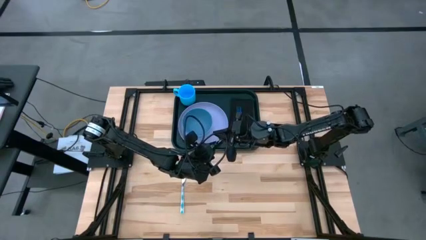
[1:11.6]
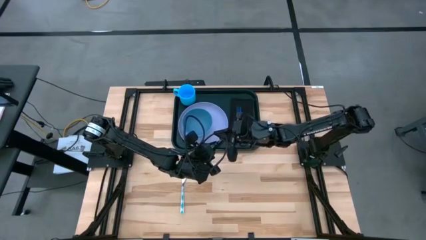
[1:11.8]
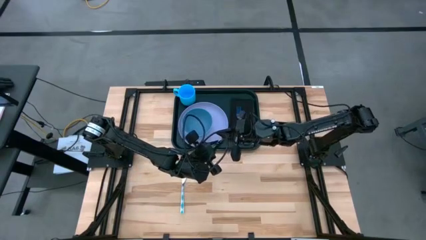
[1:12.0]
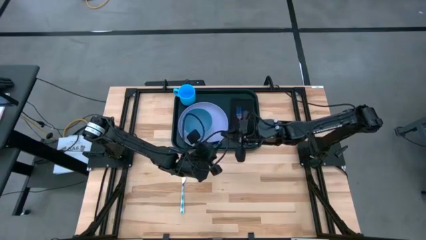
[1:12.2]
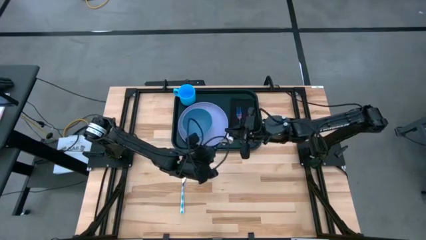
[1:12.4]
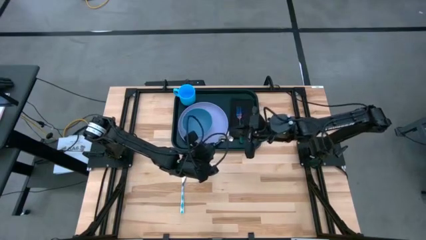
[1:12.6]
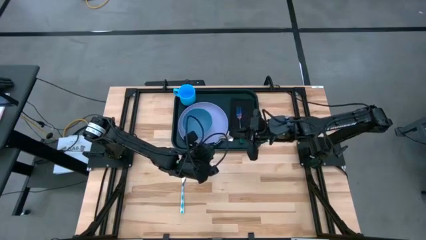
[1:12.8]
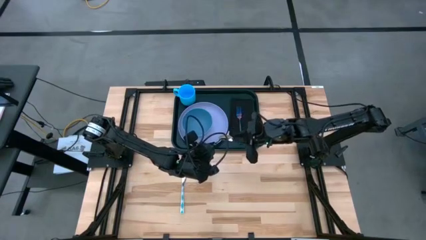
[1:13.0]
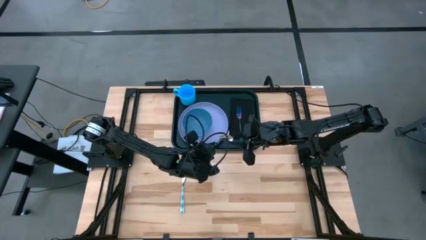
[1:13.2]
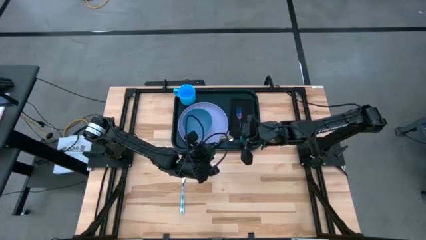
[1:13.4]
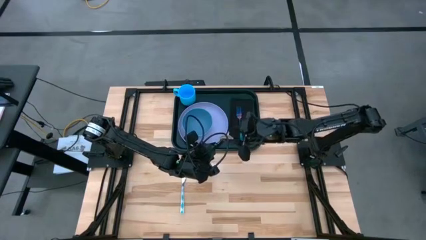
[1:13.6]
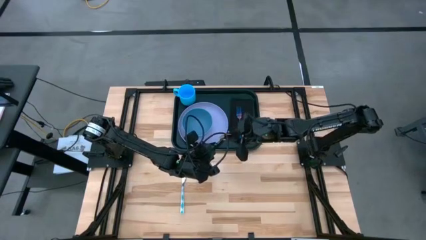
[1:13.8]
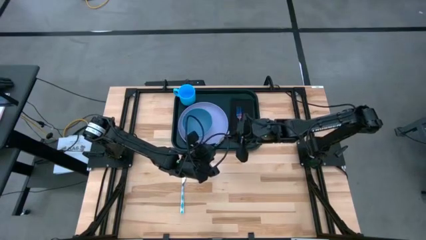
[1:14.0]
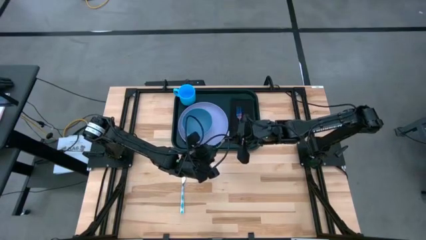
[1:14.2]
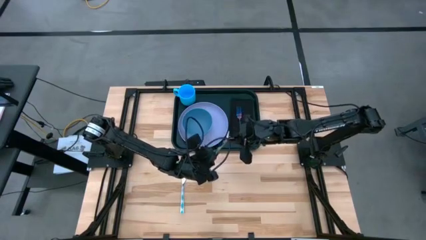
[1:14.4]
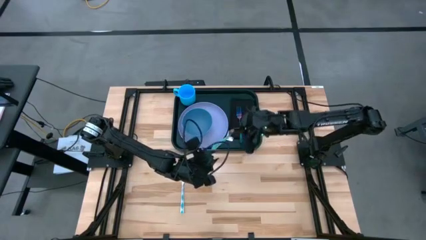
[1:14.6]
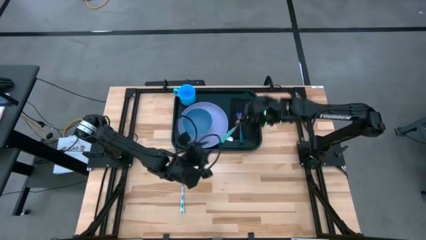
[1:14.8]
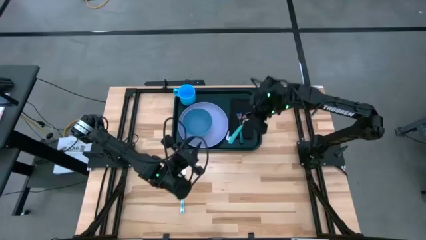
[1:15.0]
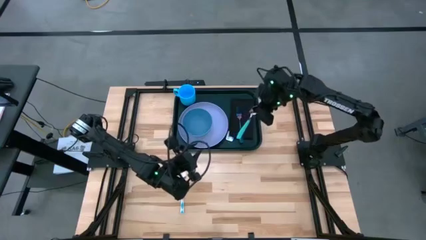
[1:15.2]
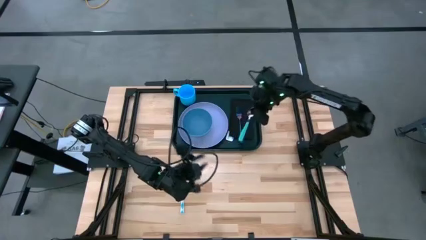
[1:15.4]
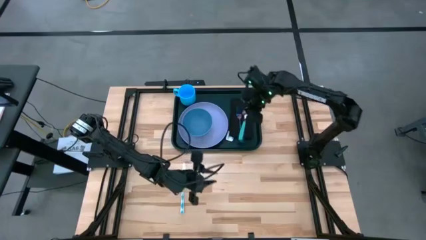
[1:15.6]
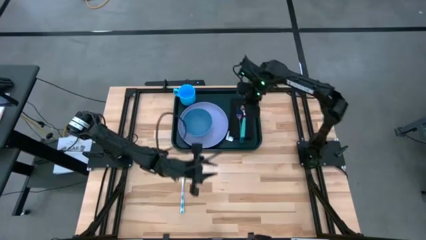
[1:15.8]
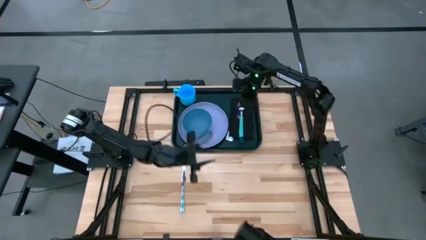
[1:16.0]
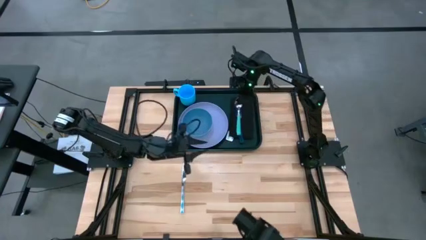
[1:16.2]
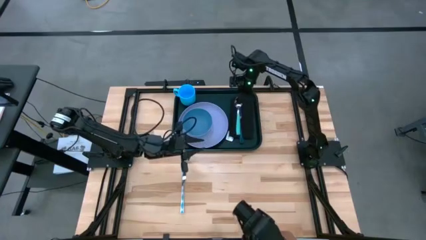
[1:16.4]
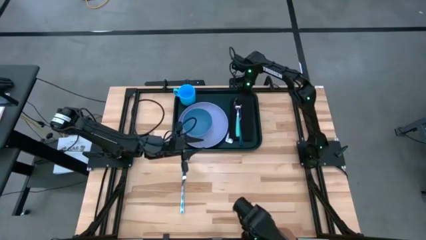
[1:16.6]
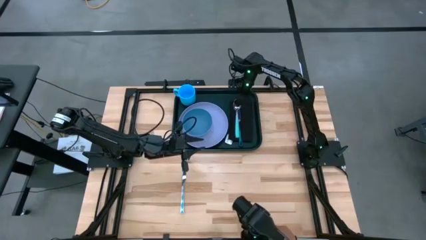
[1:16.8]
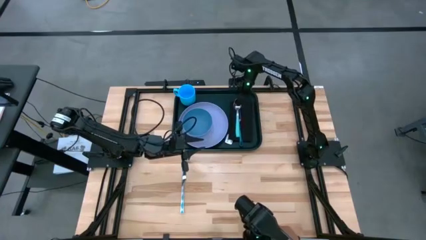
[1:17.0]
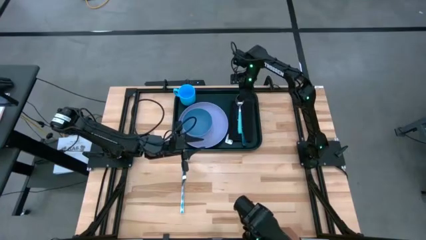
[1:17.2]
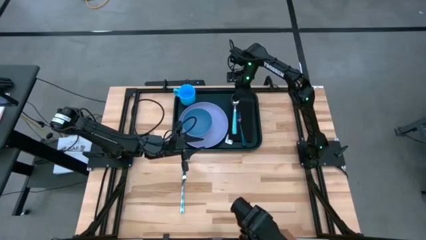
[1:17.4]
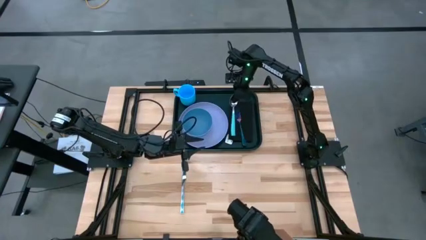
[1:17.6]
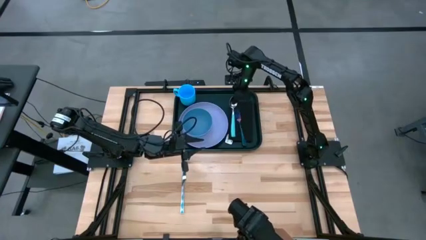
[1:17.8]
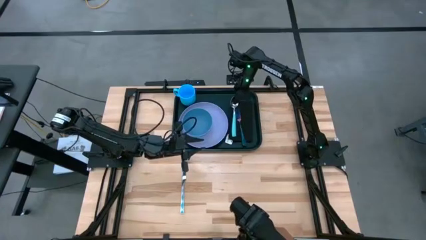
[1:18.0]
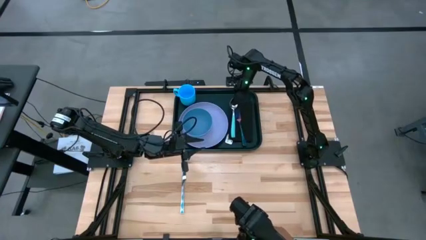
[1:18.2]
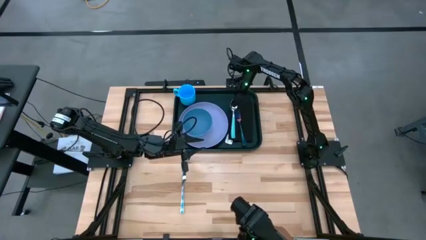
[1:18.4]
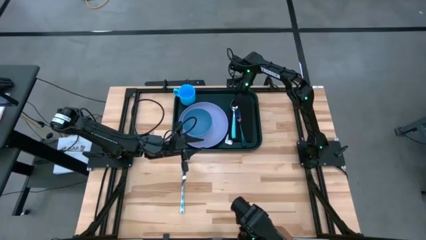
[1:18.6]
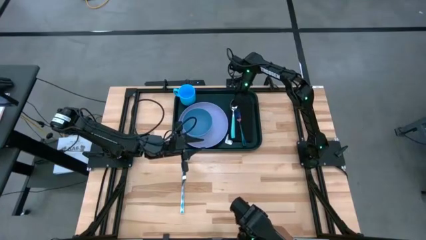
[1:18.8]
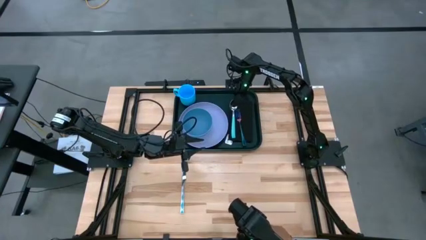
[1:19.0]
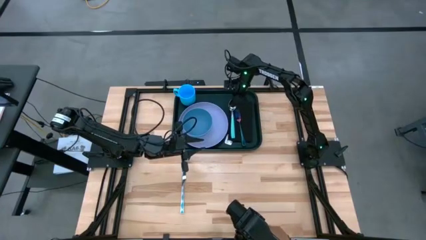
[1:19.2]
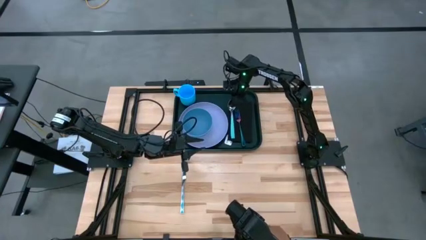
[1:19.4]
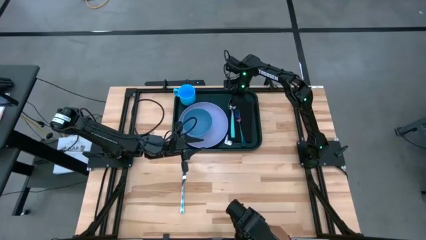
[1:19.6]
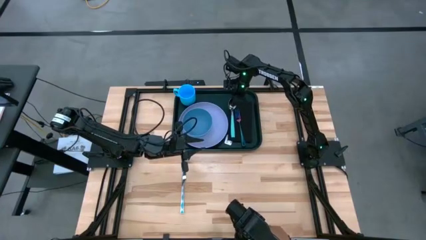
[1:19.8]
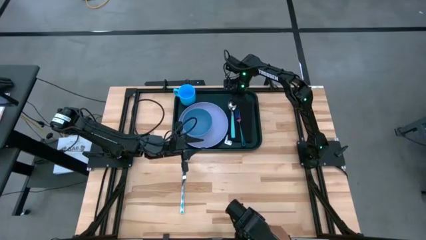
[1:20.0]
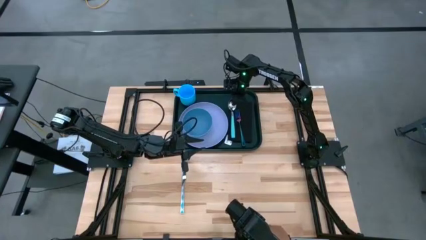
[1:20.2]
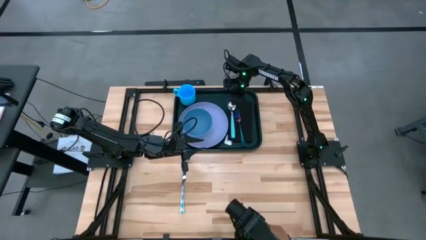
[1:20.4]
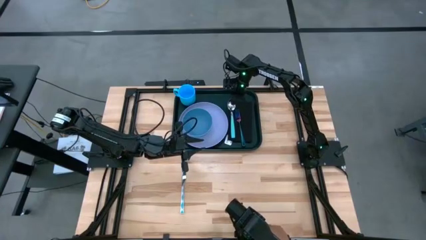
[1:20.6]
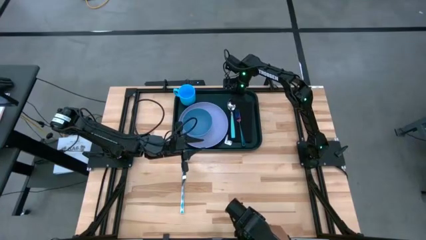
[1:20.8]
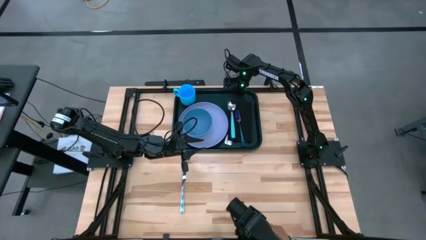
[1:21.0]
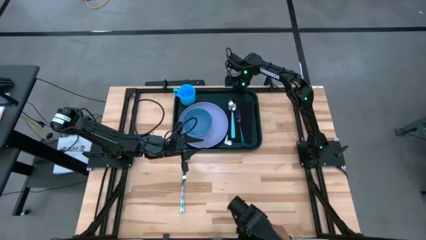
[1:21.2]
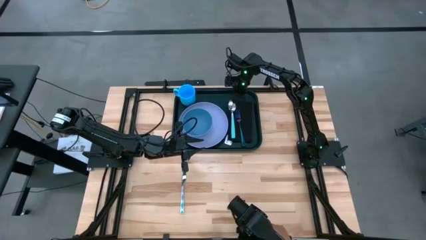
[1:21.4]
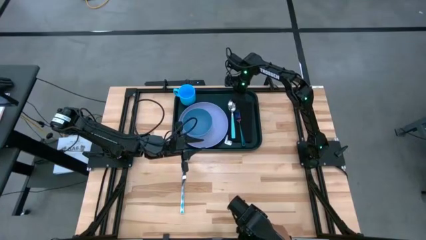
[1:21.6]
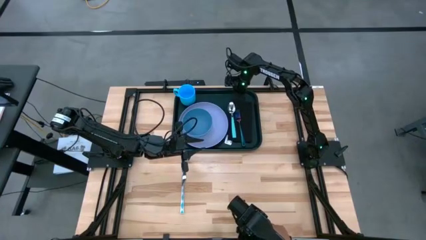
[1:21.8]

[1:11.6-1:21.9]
Task: Set up tray
Put the blue spoon on top of the black napkin to the left of the blue fork
